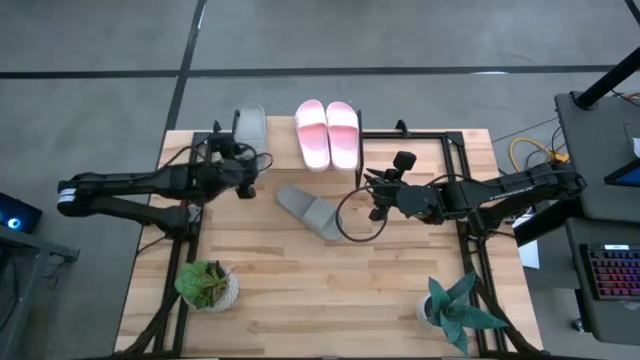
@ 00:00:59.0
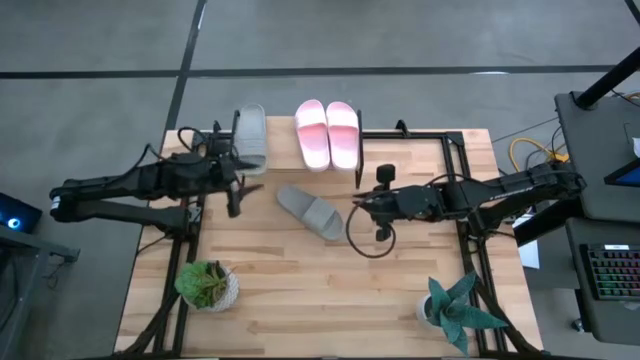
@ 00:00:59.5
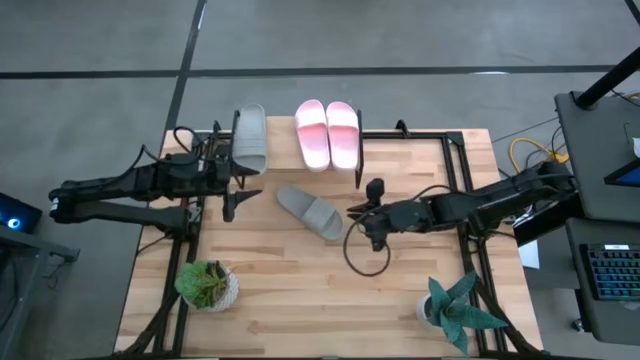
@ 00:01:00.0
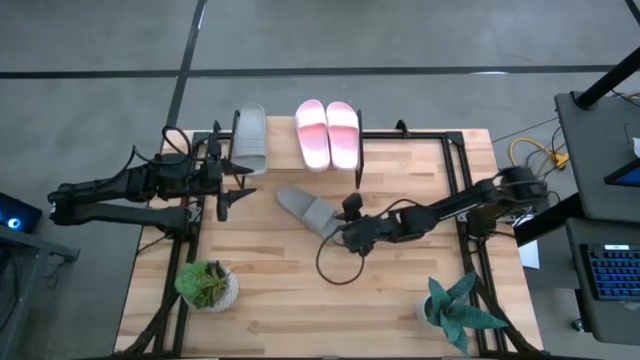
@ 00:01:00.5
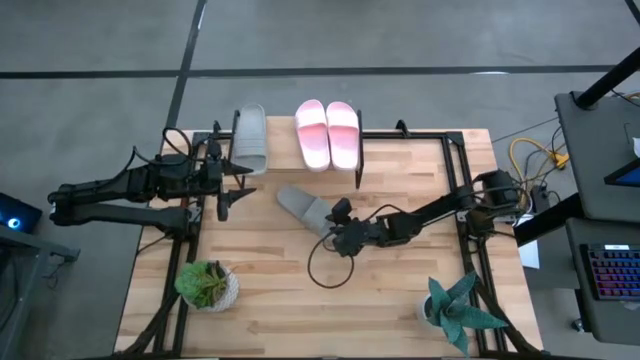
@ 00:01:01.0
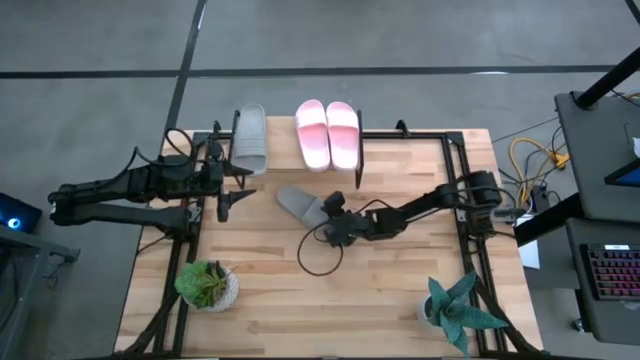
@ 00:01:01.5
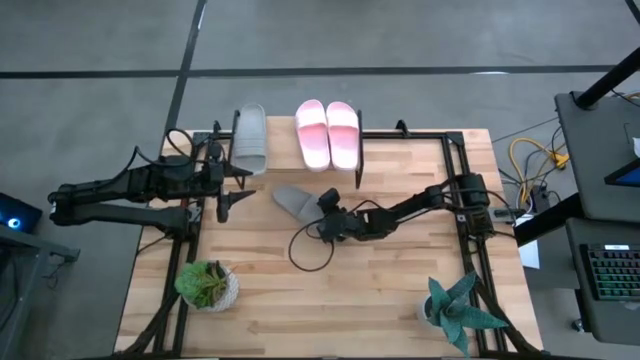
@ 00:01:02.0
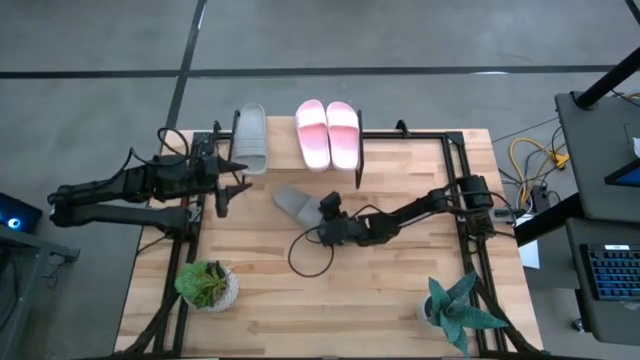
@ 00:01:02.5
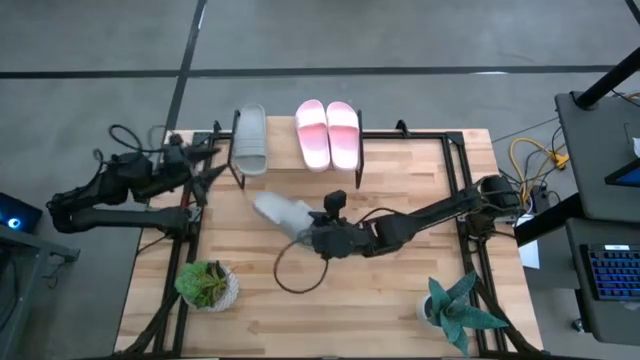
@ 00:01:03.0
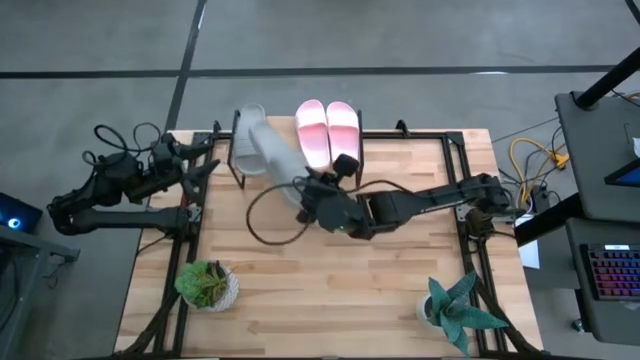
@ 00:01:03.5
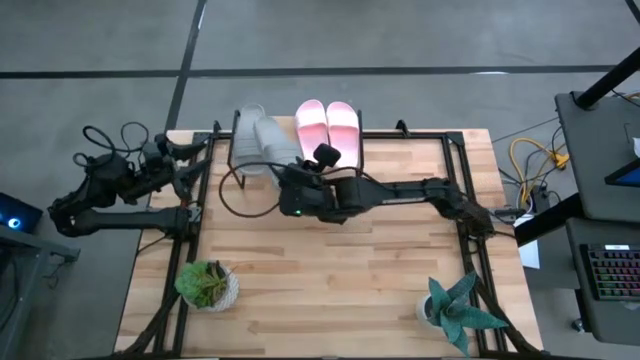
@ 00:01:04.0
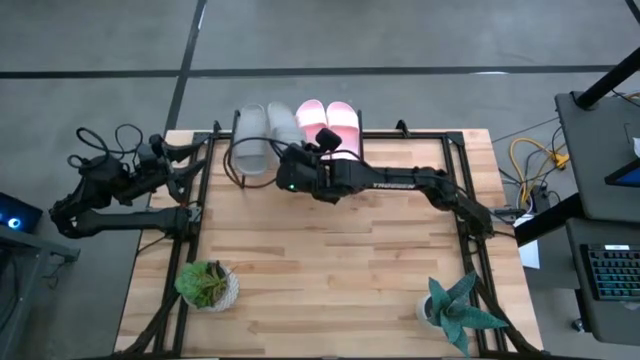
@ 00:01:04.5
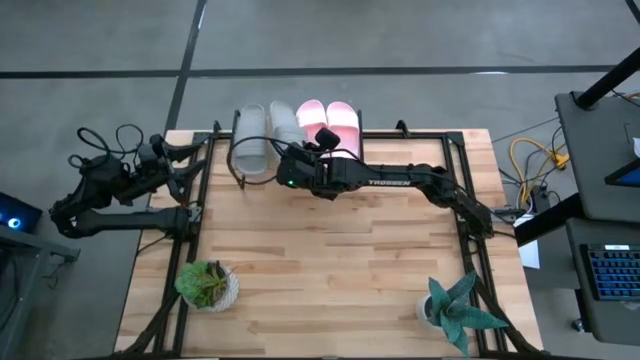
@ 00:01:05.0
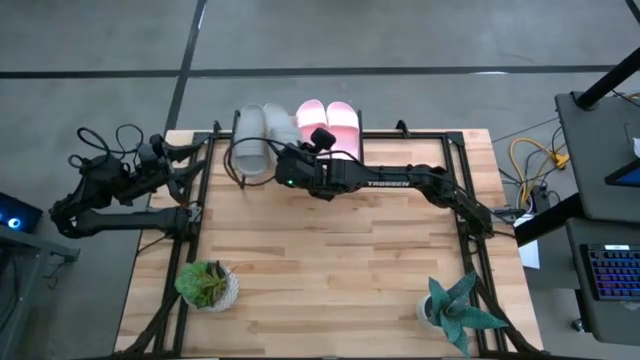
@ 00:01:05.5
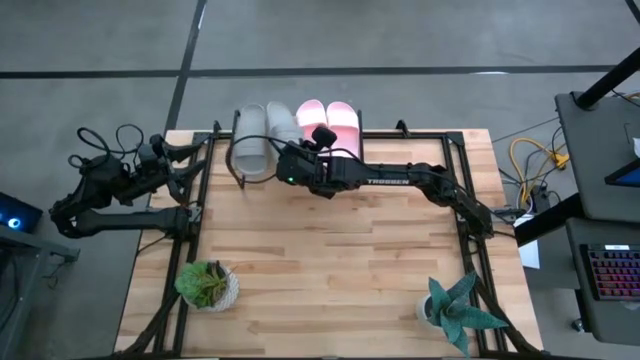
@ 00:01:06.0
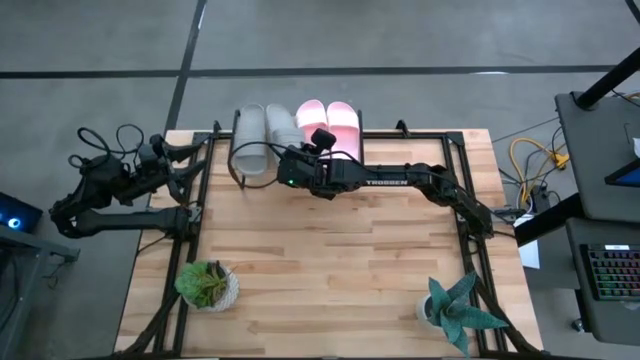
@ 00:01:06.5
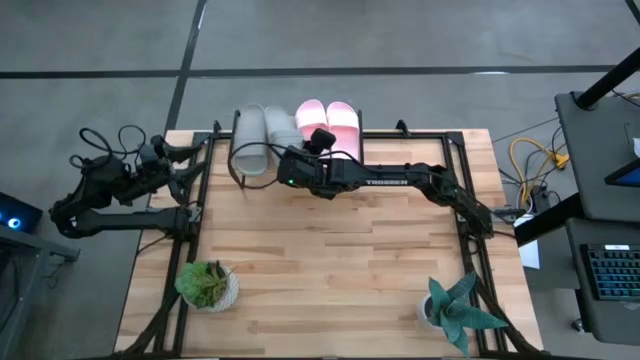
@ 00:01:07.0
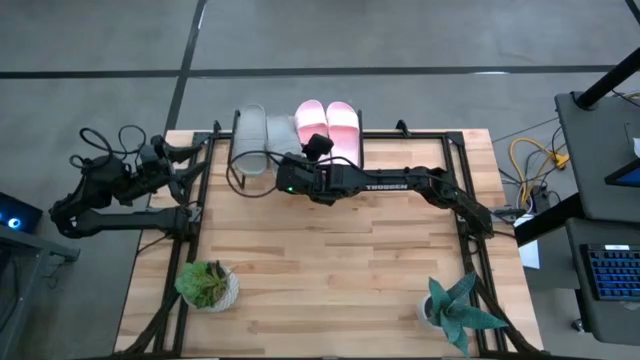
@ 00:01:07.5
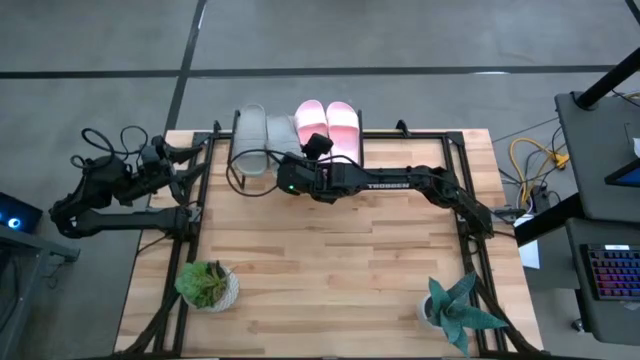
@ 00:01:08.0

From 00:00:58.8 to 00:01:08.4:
Task: Pick and place slides into the shelf
Put the gray slipper on the shelf

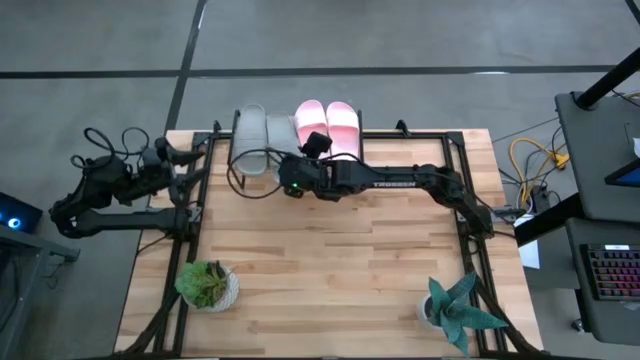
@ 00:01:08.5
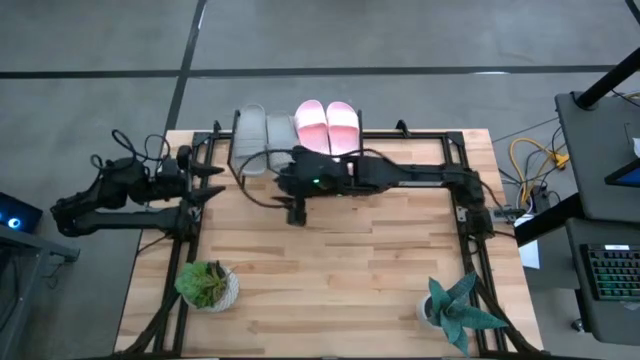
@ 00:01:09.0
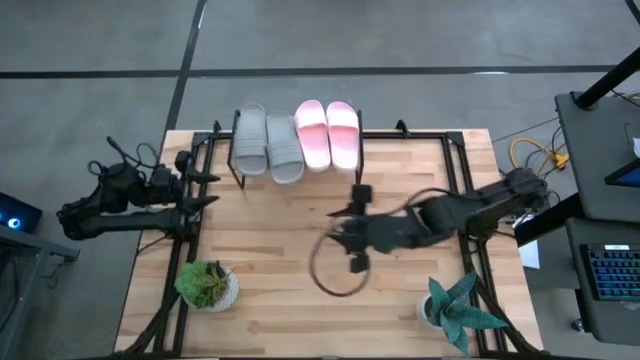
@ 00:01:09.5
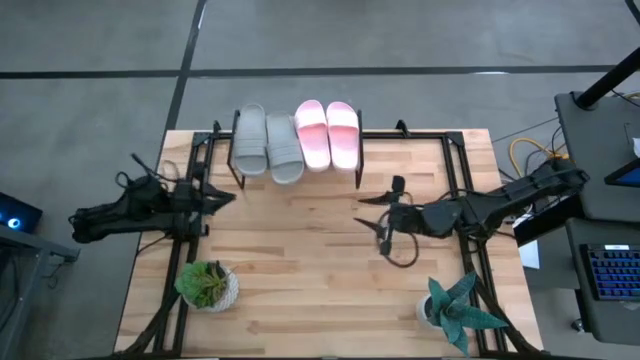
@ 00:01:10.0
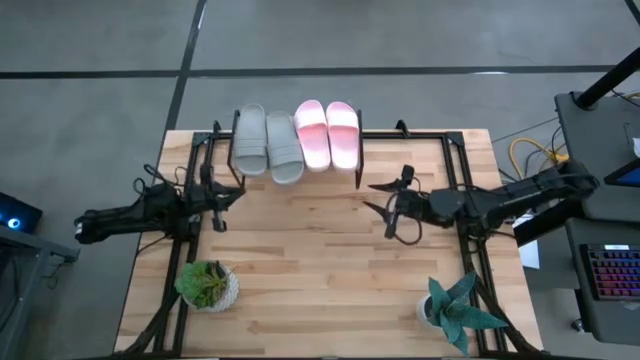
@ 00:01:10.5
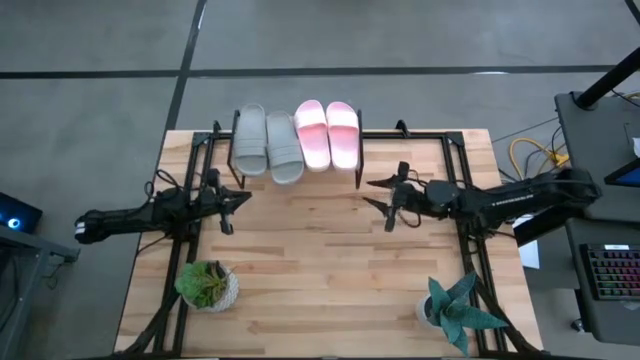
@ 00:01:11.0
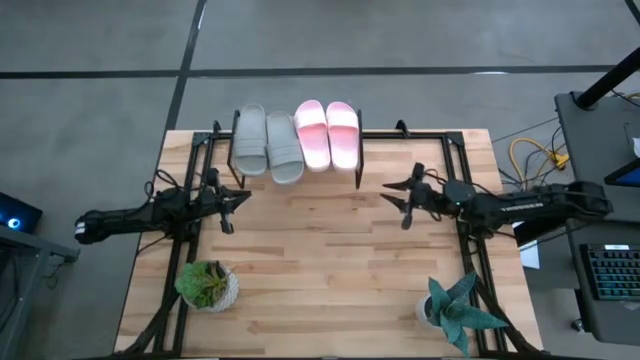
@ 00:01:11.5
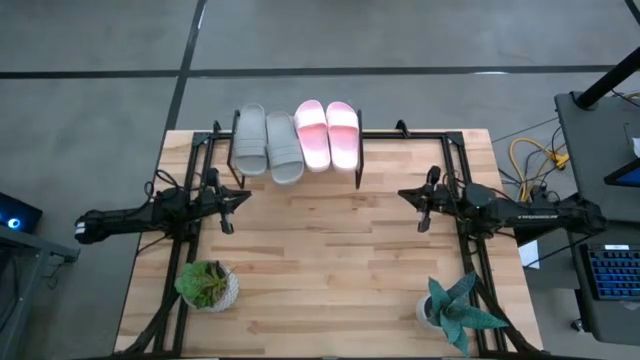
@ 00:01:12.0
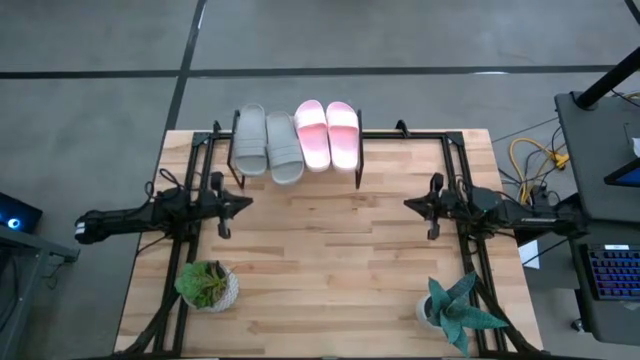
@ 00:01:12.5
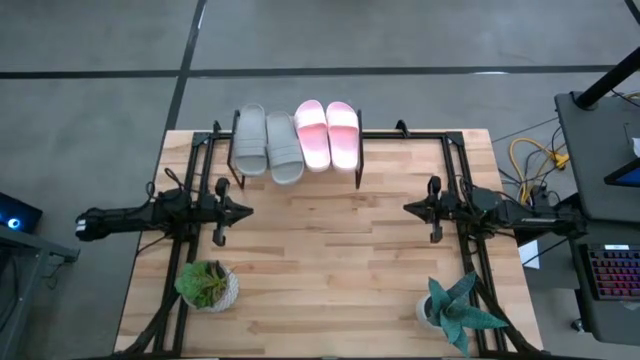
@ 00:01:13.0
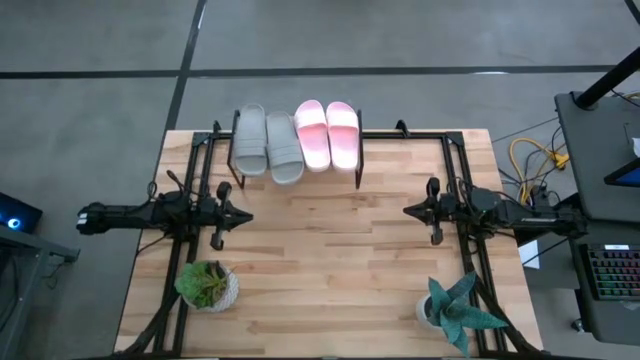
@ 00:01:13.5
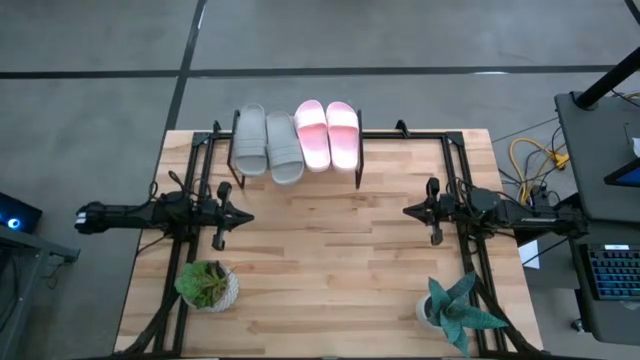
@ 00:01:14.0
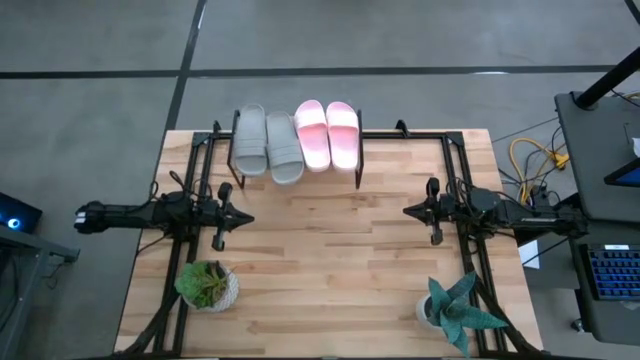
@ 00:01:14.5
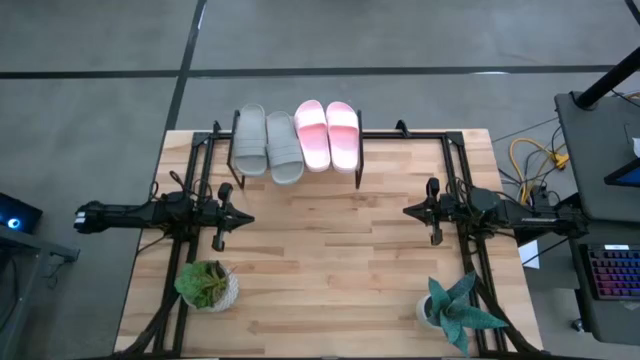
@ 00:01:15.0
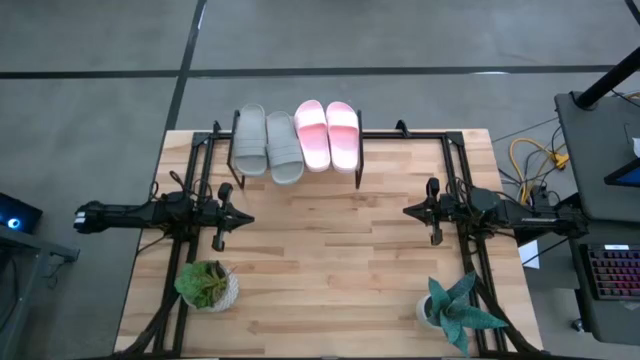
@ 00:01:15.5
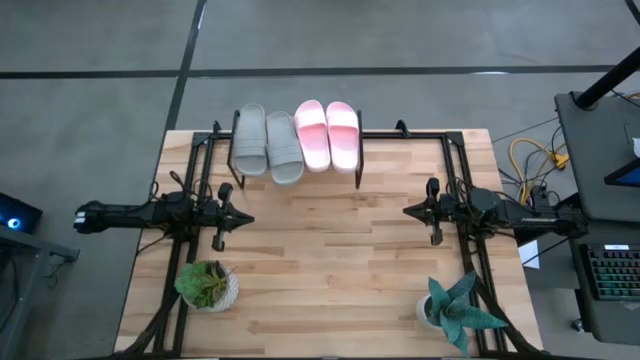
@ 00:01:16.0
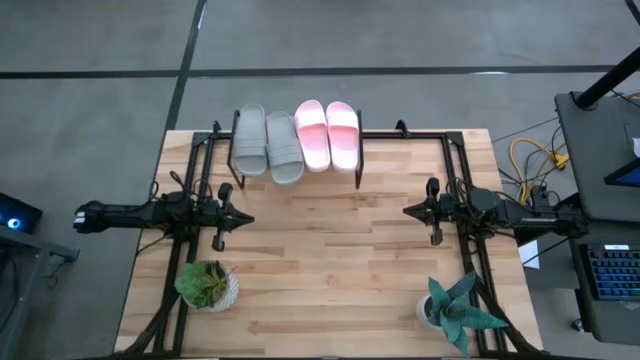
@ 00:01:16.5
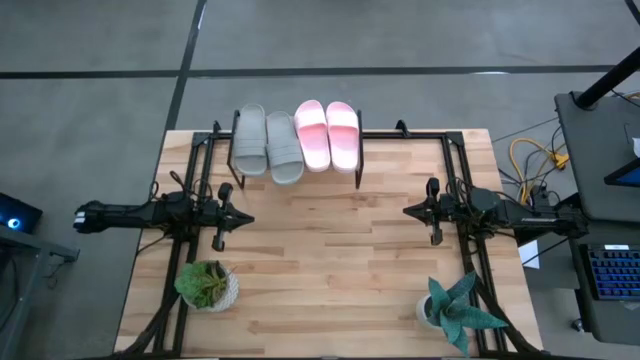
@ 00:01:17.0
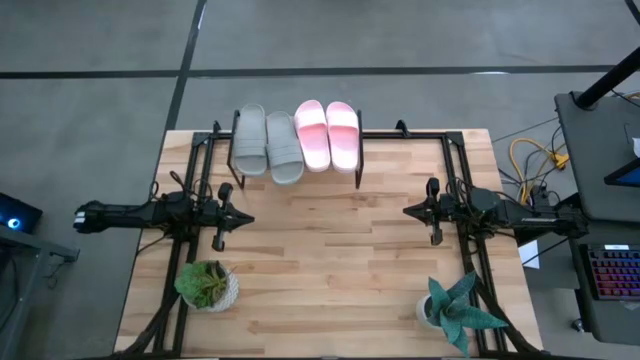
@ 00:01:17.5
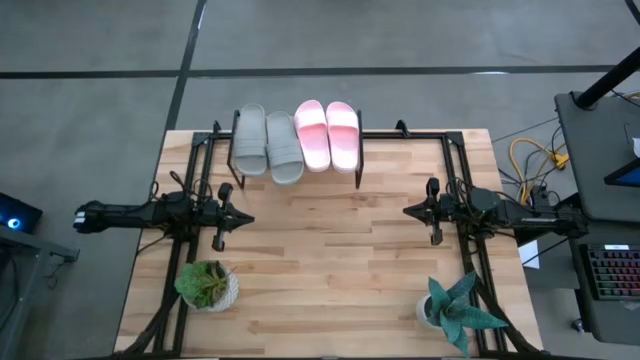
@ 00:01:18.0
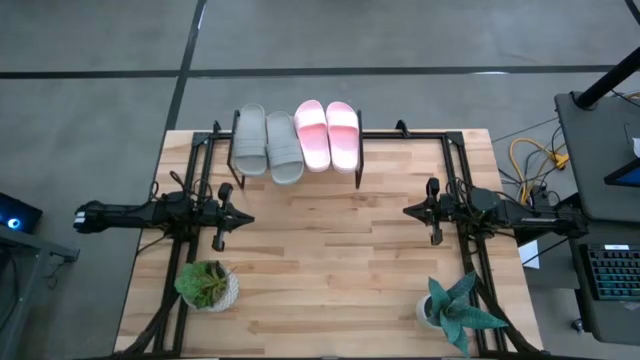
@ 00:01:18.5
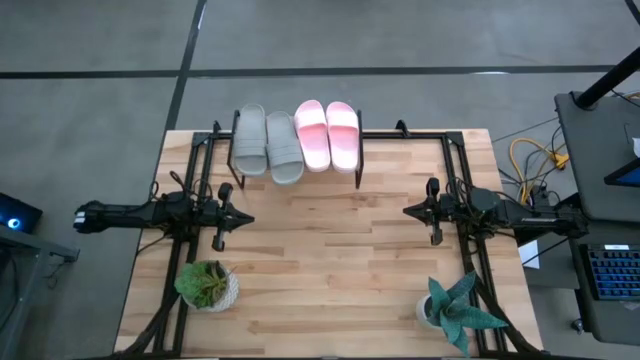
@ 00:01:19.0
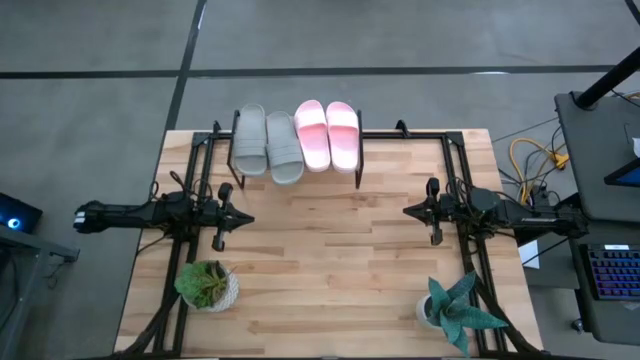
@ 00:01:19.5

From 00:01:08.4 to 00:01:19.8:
Return to Home Position
